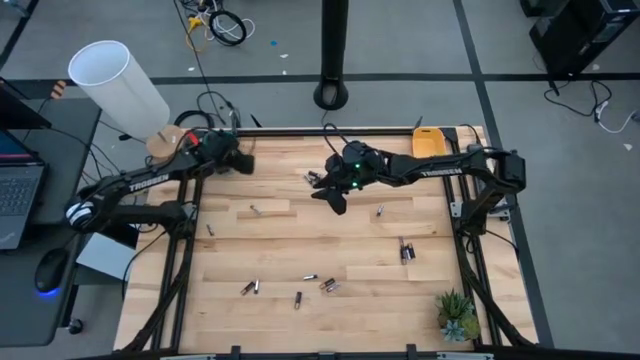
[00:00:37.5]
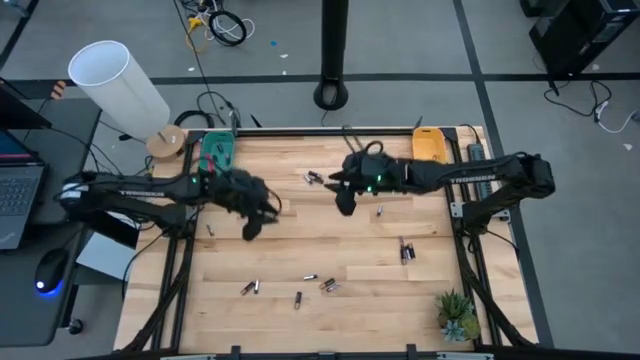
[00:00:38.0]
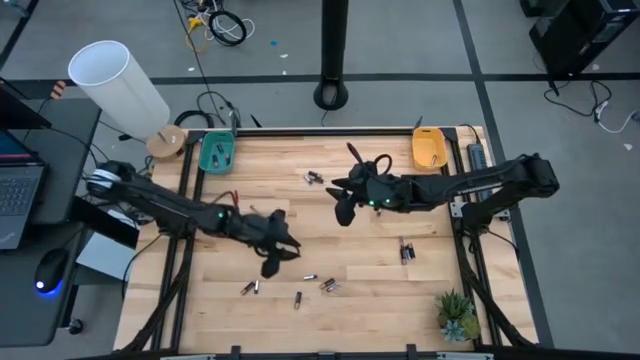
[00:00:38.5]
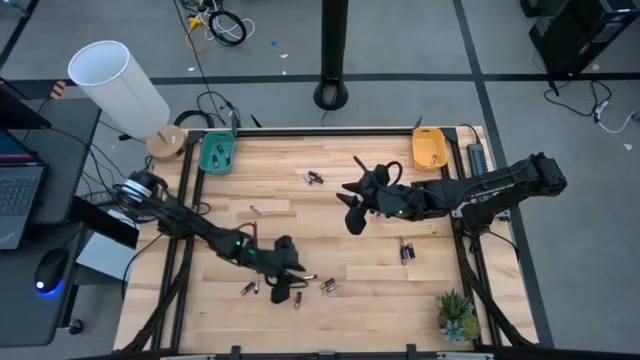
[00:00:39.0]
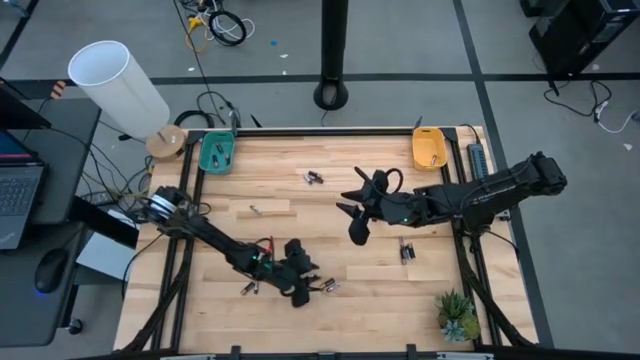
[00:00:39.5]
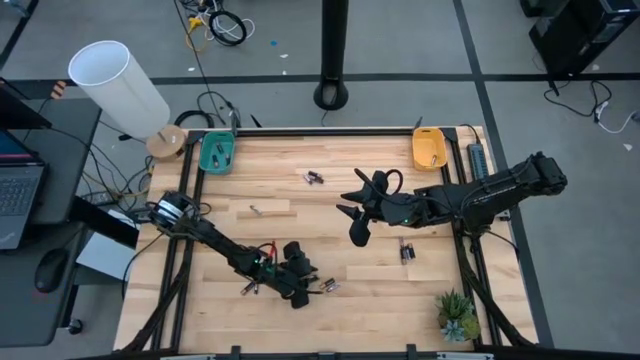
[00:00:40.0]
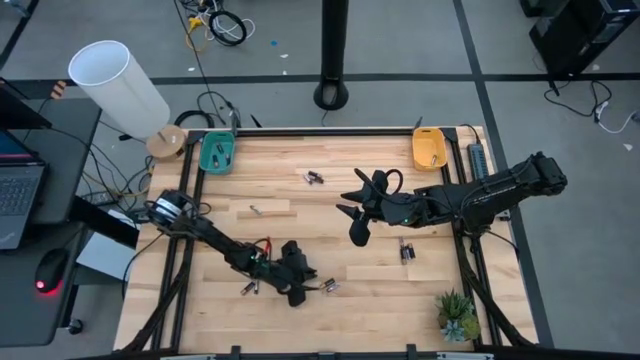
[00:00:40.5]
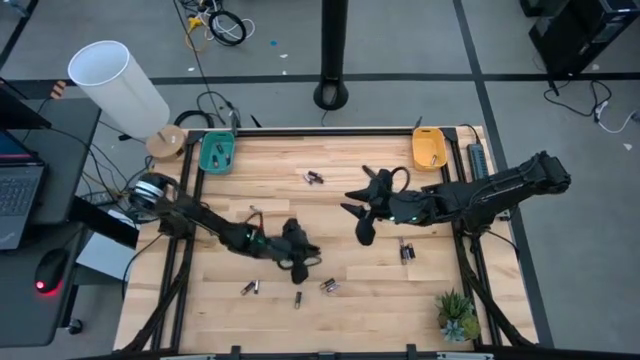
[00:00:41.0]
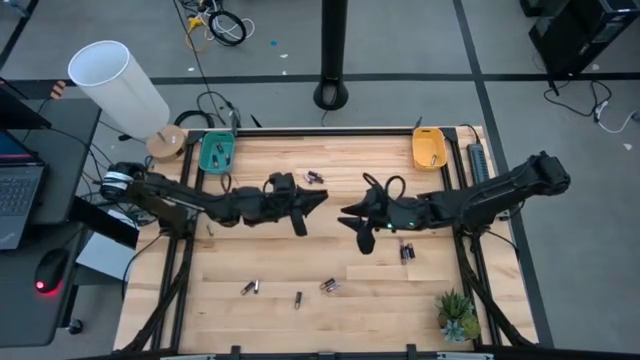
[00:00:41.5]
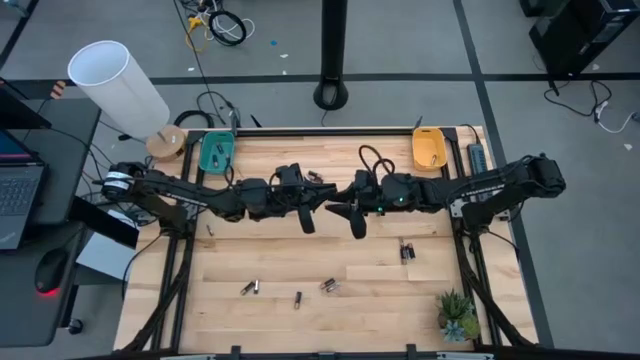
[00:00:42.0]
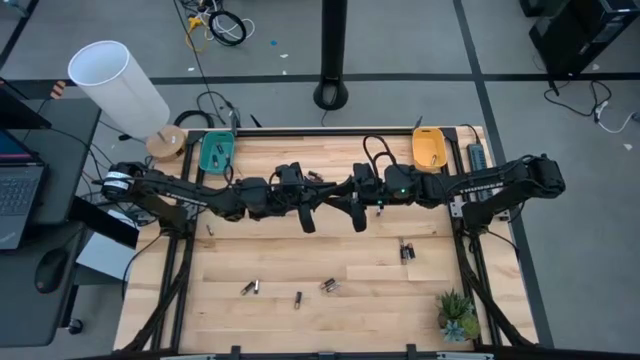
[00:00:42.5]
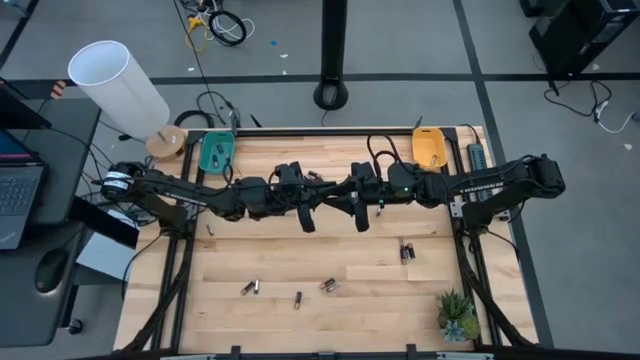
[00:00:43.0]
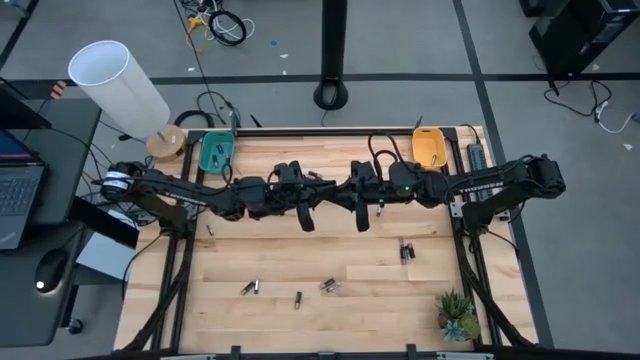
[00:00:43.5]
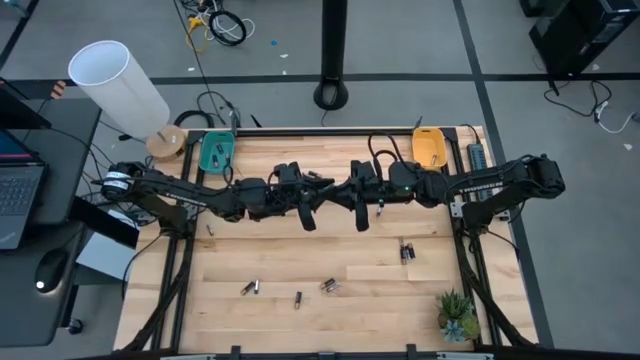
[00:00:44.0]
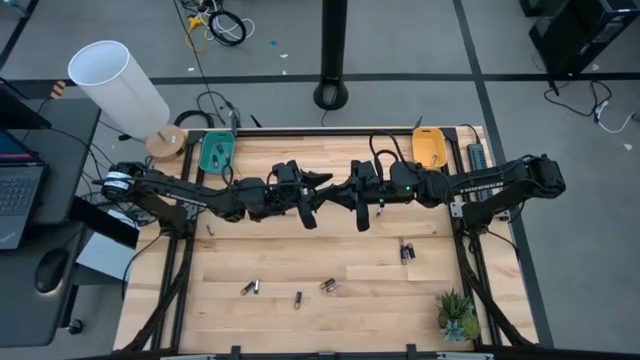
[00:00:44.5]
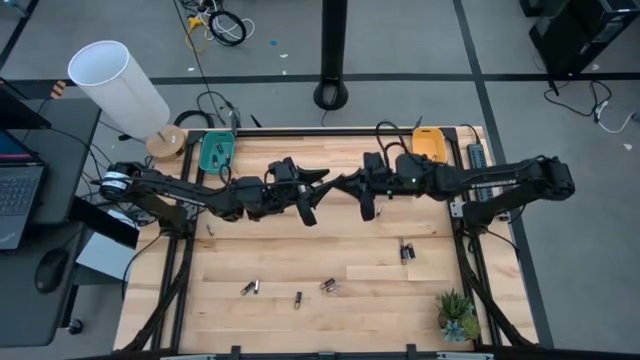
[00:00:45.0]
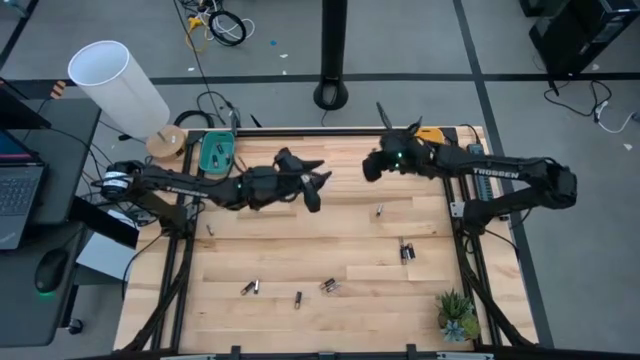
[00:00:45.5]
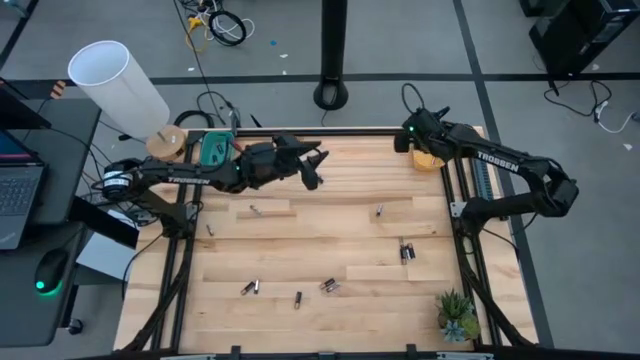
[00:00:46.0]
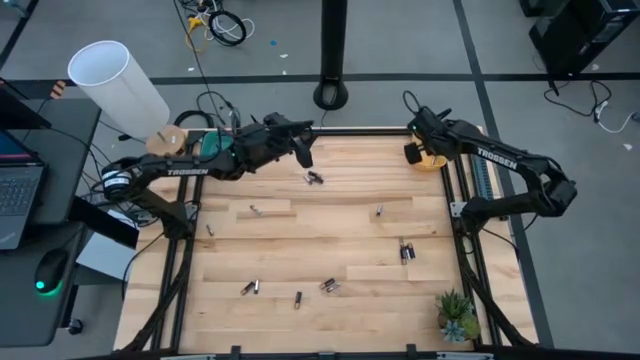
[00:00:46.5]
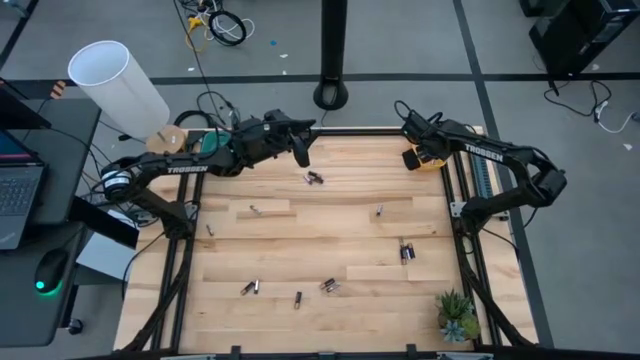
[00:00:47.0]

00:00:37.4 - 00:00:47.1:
Task: Sort batteries
Put the silver battery into the yellow bin

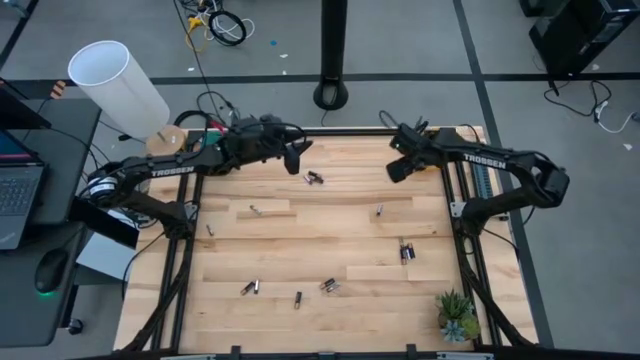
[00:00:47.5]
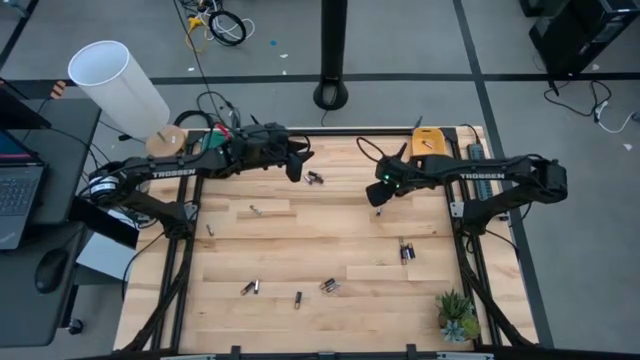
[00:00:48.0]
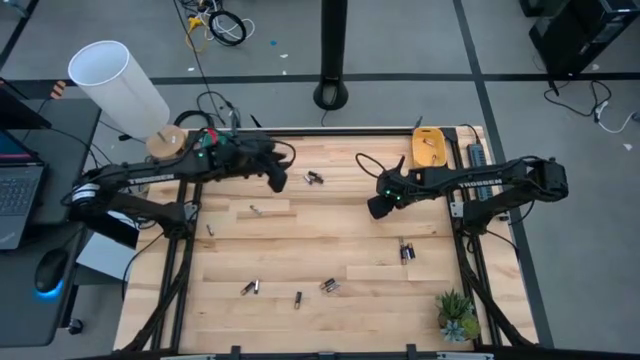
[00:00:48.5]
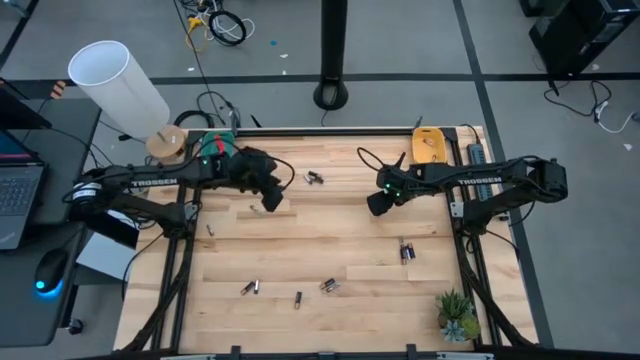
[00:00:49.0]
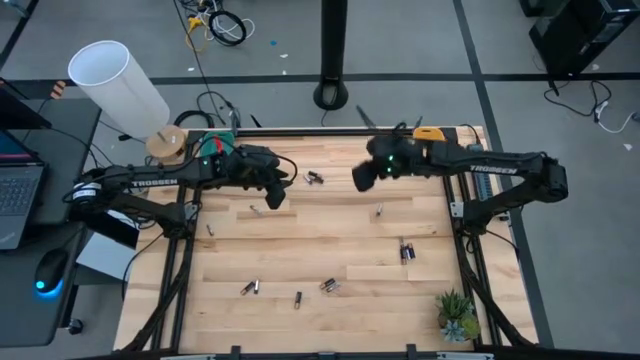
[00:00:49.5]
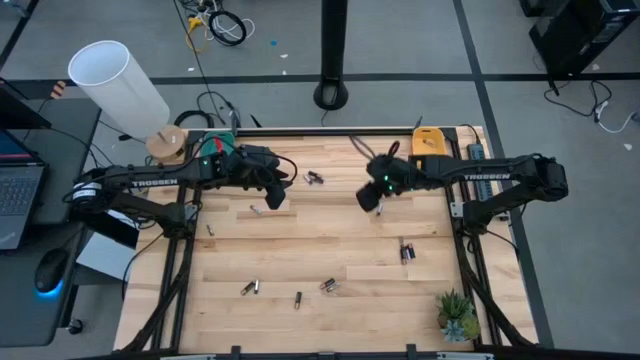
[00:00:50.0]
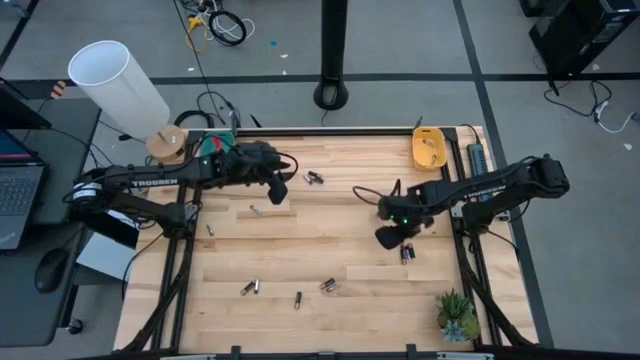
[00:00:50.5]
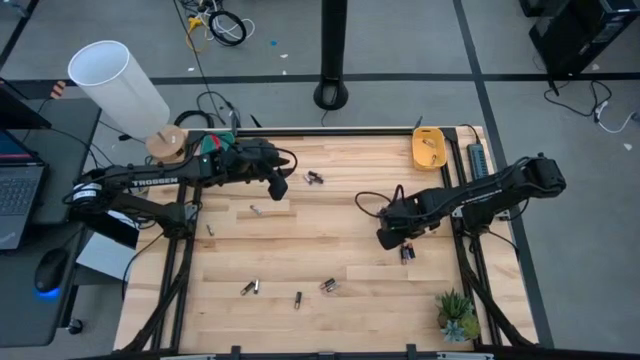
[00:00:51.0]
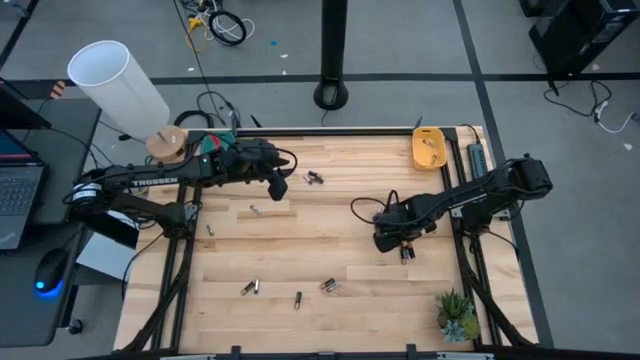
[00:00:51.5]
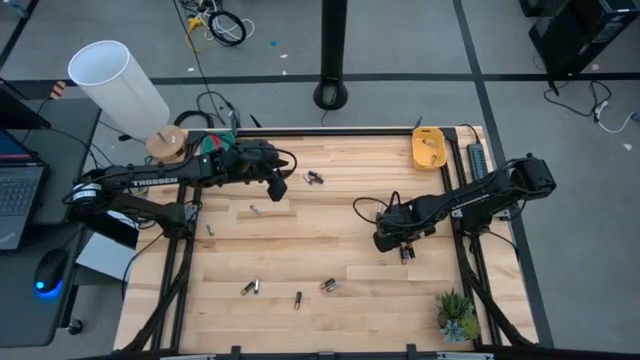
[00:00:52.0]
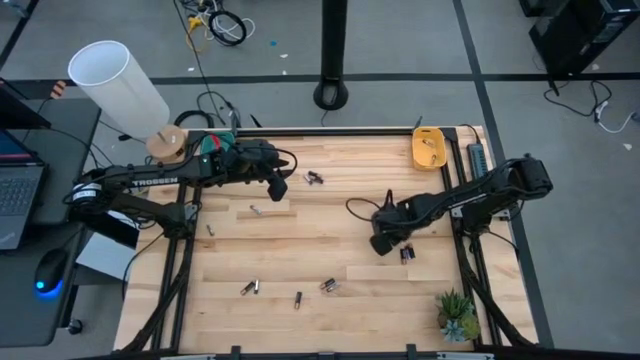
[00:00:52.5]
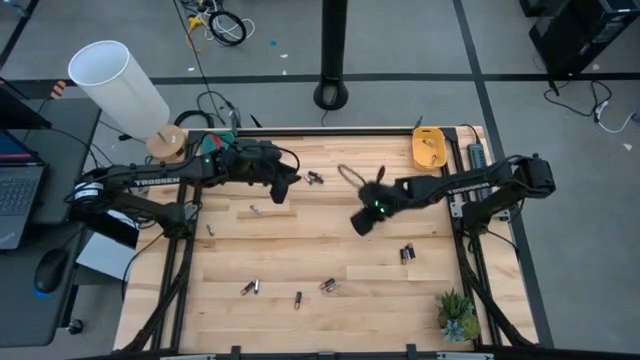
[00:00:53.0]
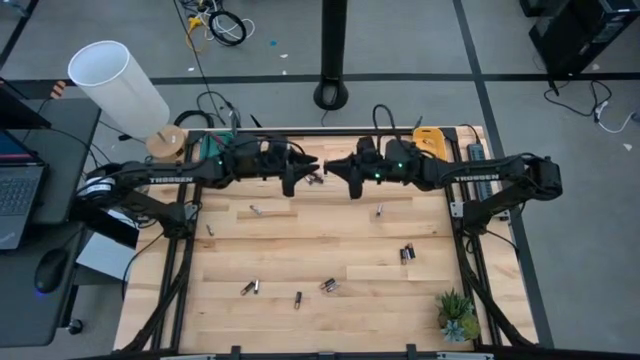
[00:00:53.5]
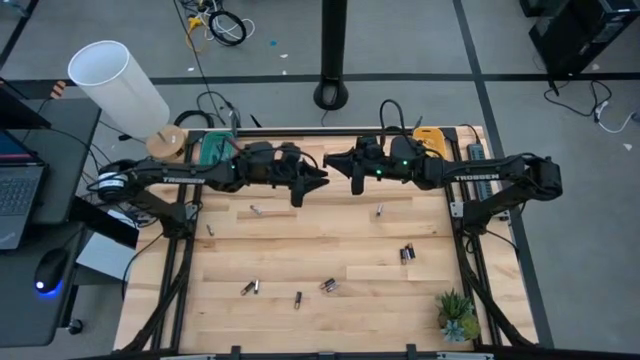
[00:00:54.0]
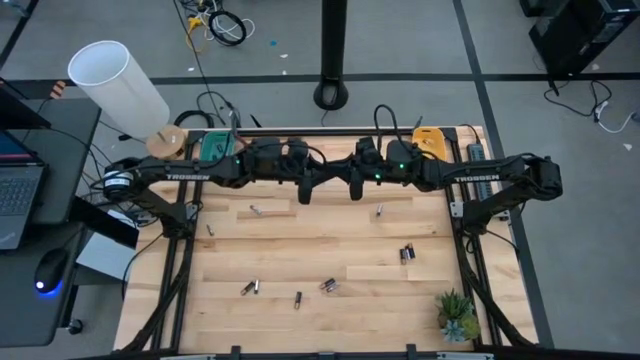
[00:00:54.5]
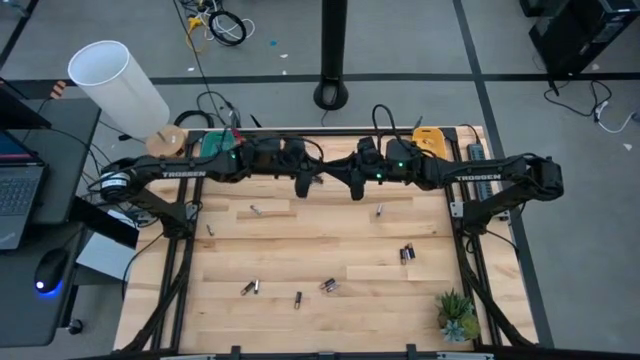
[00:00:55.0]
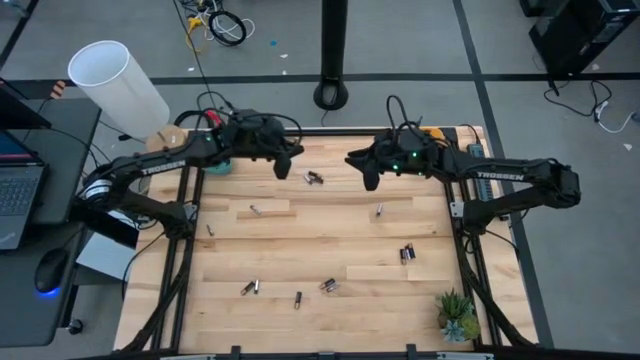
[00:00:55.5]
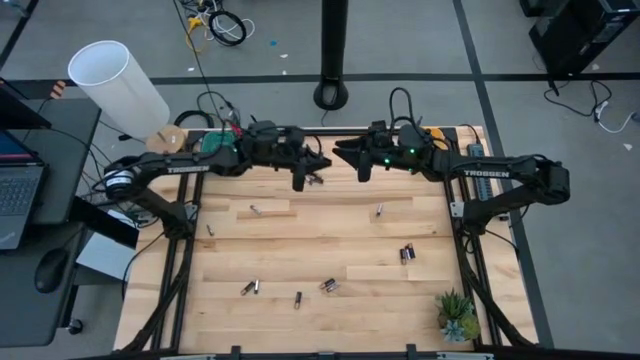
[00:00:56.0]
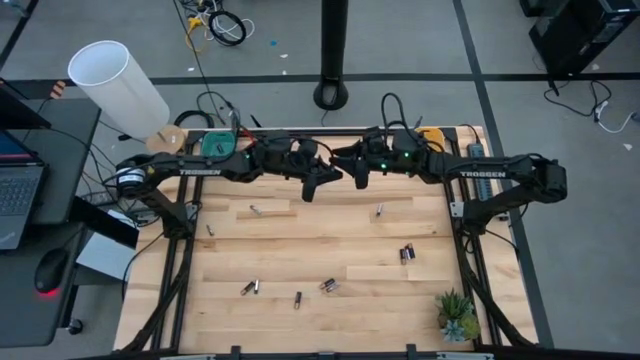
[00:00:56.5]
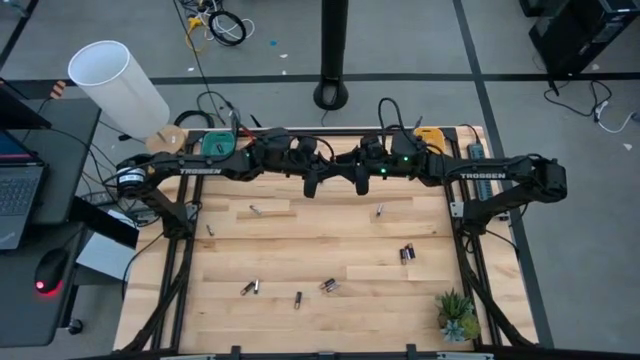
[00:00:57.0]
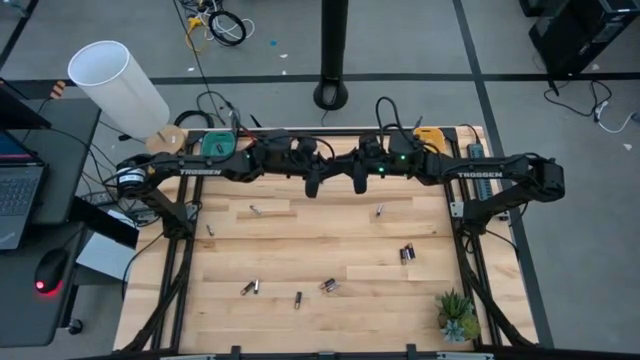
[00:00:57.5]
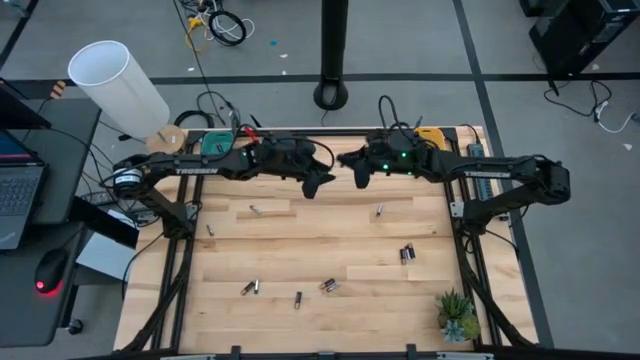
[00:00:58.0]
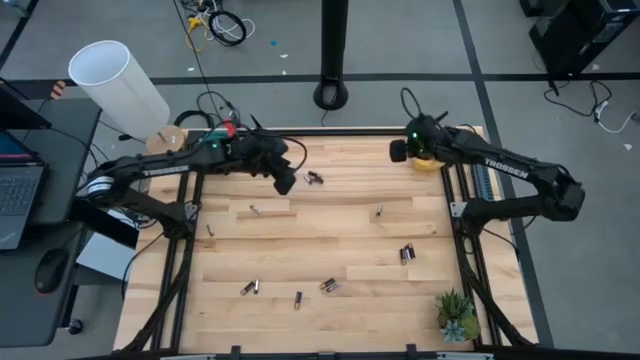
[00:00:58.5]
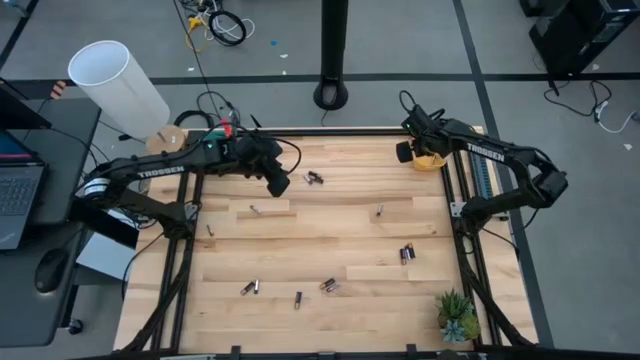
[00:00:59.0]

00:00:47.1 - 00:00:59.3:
Put the silver battery into the yellow bin
